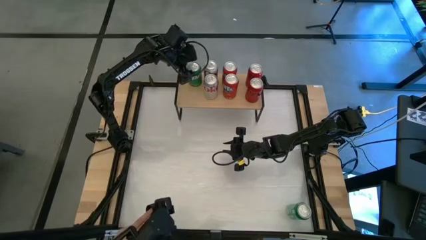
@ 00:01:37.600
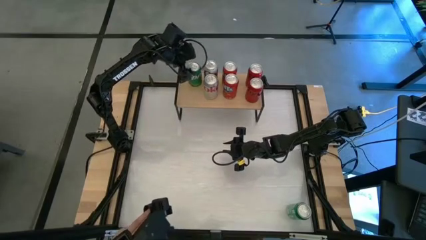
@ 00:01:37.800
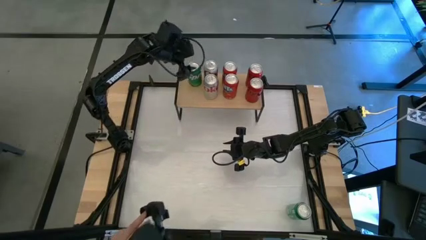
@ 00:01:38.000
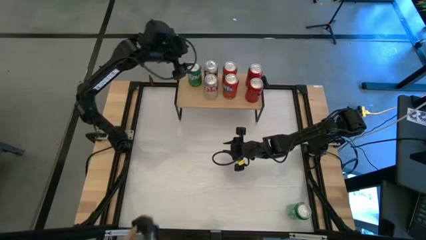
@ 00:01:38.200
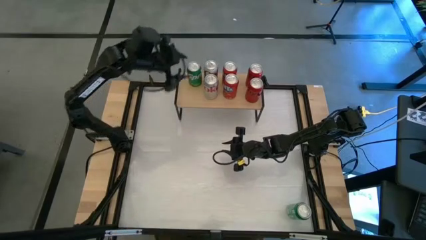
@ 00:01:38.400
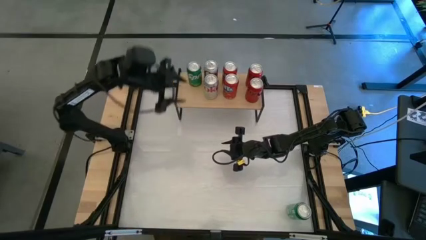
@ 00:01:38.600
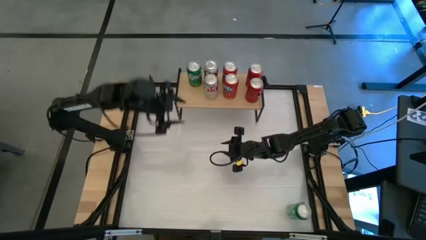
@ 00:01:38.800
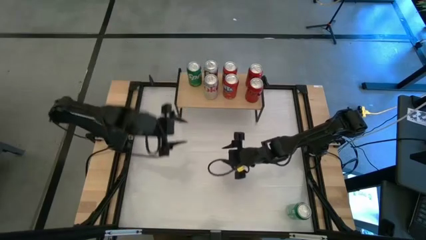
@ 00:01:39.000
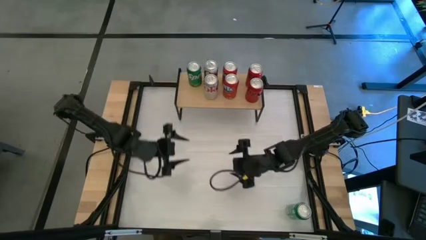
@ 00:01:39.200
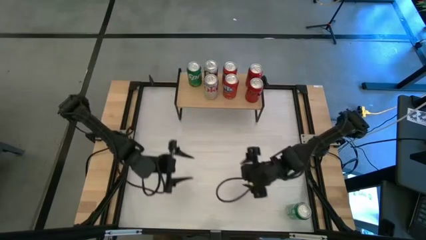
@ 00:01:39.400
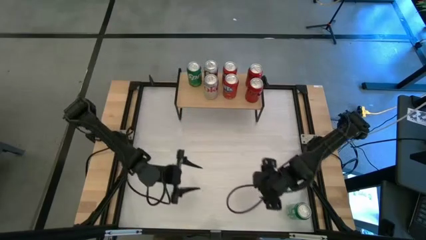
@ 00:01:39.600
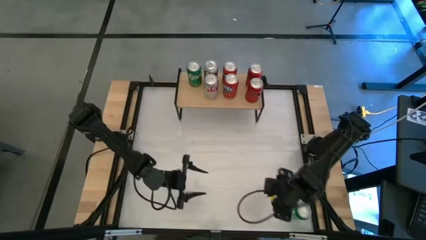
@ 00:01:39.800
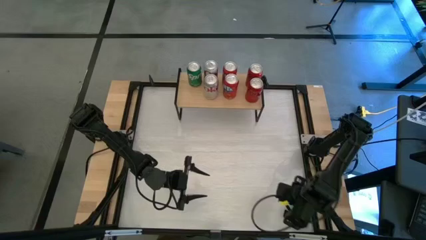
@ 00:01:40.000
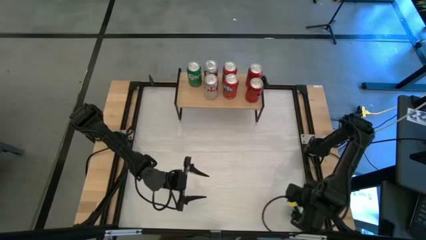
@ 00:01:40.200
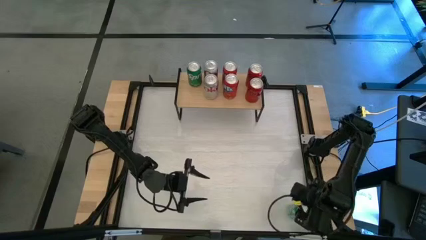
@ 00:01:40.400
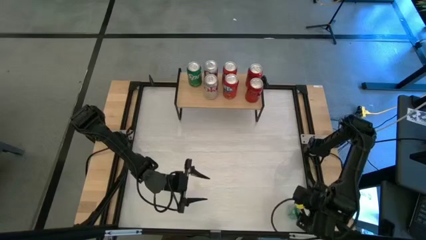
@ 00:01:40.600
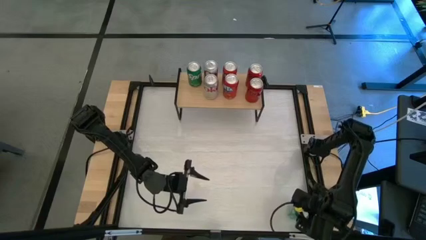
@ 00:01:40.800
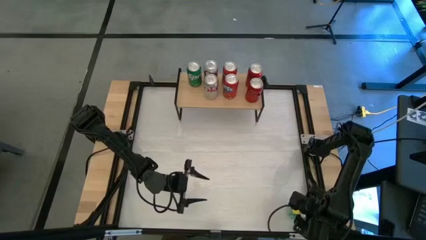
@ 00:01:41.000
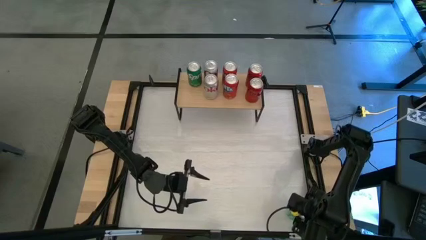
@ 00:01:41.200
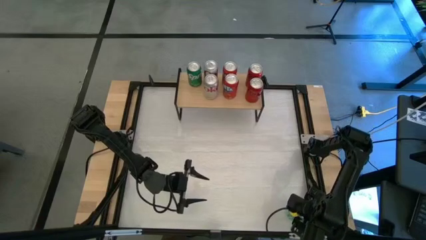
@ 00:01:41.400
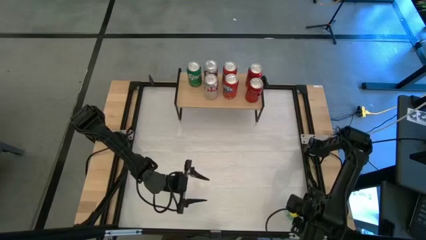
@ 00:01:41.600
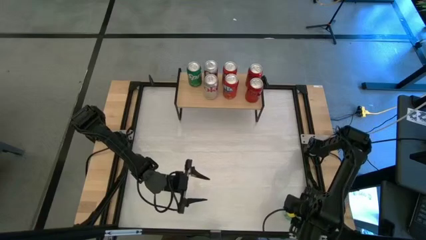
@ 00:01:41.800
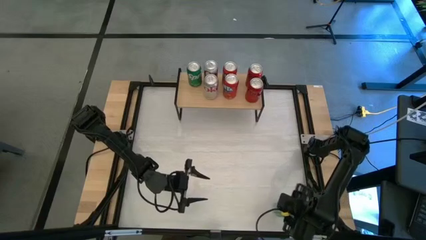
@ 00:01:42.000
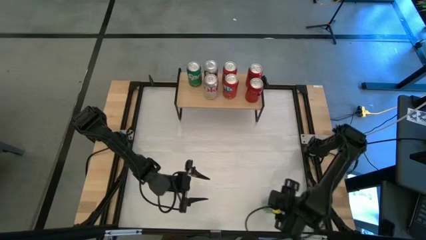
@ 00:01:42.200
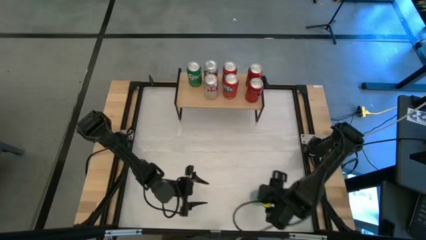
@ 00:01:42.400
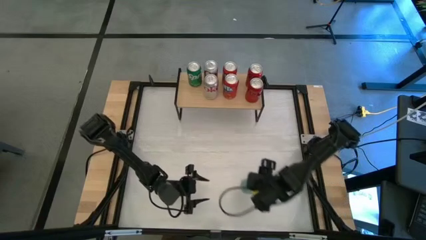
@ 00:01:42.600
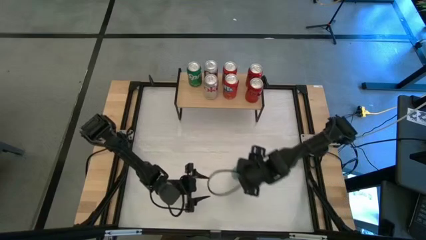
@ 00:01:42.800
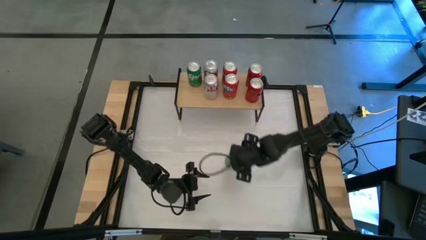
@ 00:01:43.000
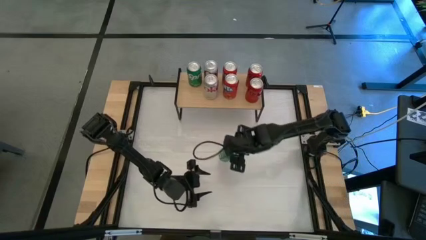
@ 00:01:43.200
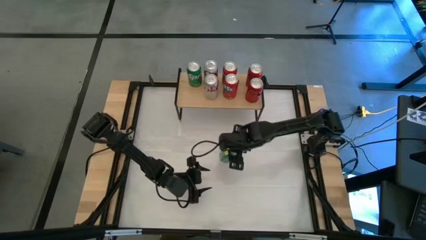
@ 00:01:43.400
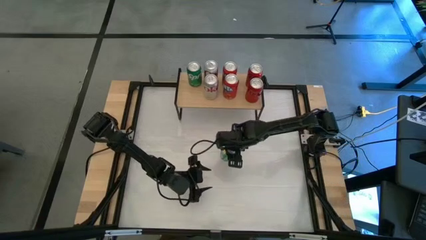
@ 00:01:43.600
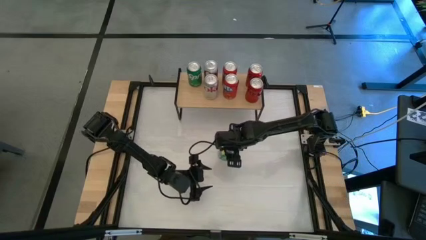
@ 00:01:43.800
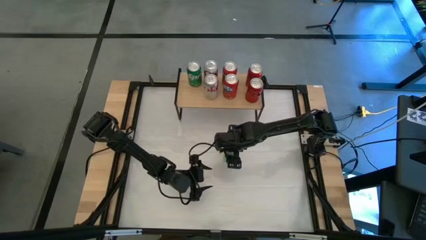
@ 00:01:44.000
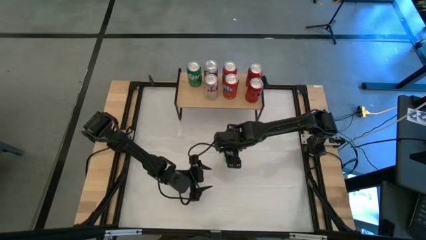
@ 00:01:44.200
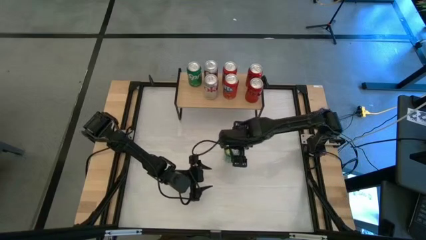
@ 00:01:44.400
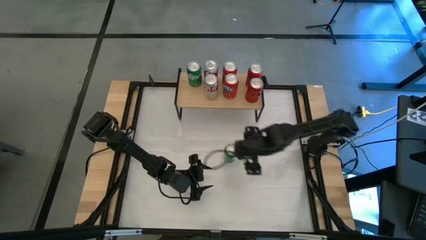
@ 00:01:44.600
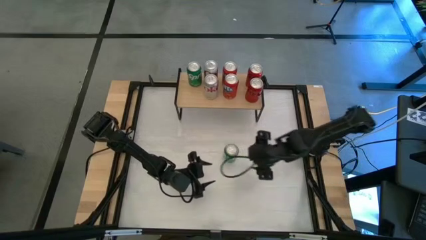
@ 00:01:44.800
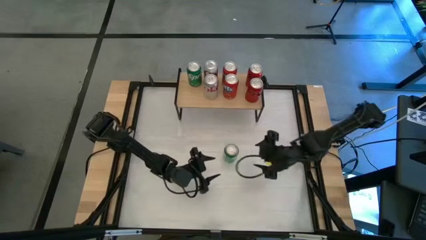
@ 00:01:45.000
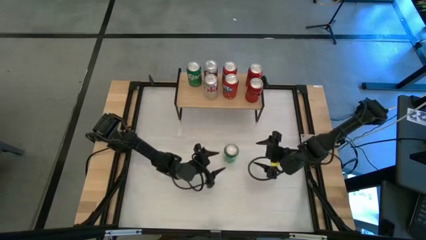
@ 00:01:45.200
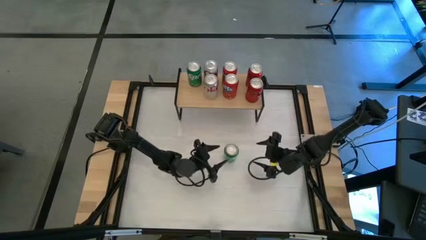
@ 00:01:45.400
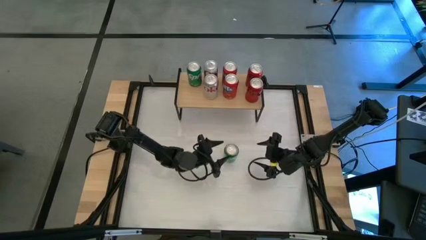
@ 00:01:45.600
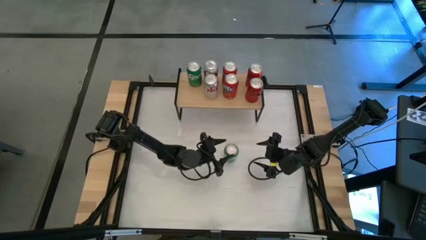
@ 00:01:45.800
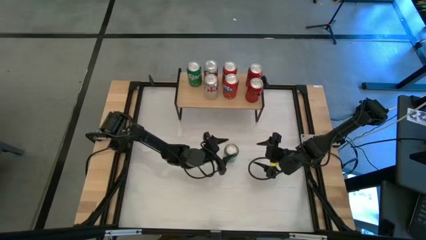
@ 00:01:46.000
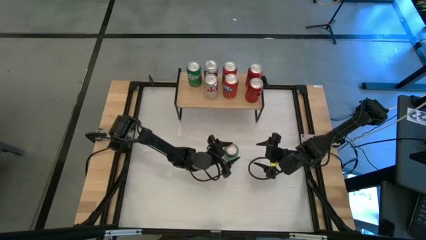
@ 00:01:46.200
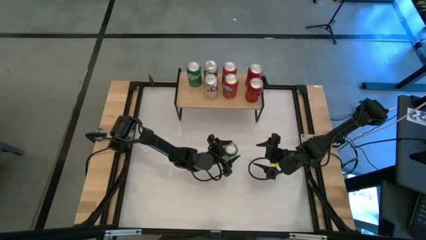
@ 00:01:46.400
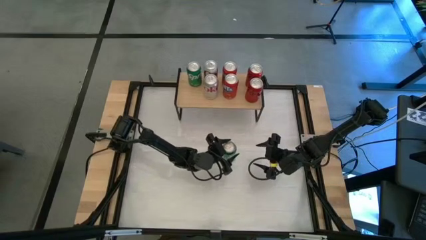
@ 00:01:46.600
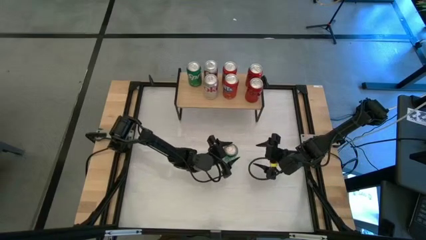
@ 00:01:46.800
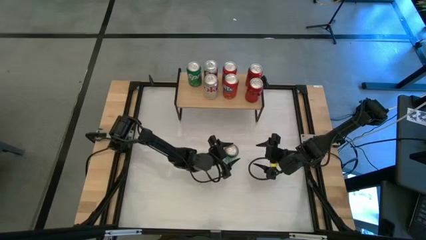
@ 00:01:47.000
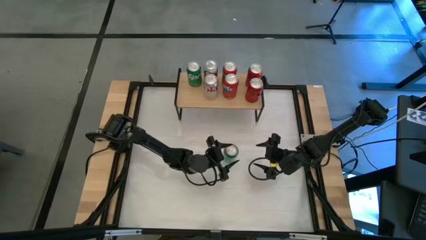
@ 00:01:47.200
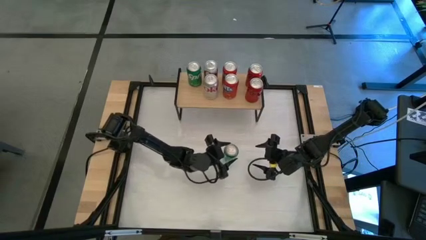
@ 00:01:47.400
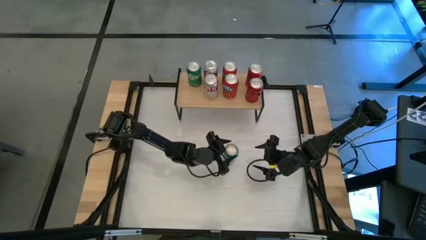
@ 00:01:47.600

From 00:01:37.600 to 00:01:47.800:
Task: Place canned beverage on shelf
Put the green soda can on the shelf and align with the other green soda can
